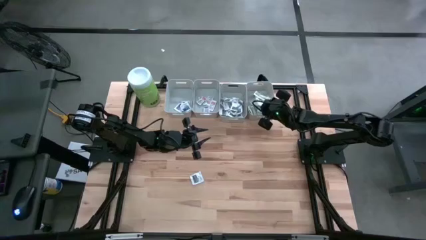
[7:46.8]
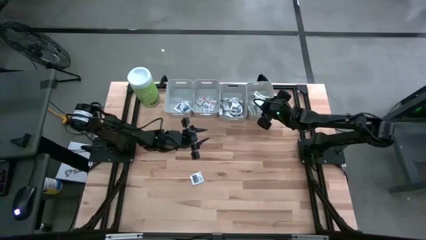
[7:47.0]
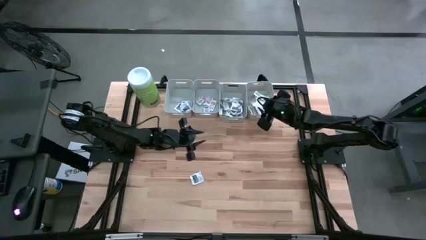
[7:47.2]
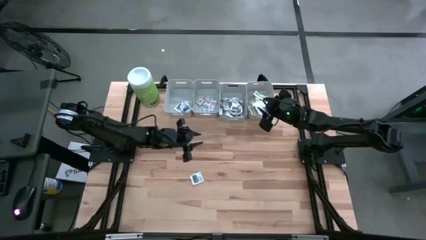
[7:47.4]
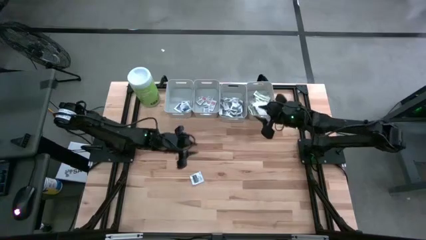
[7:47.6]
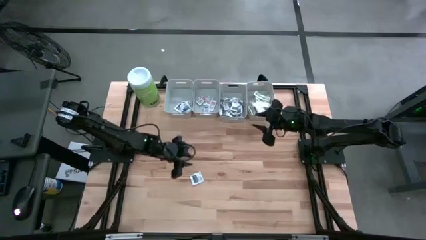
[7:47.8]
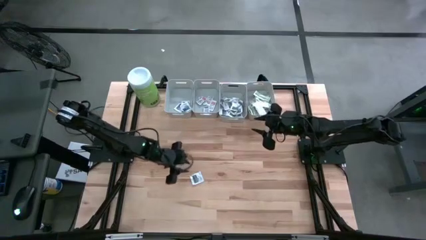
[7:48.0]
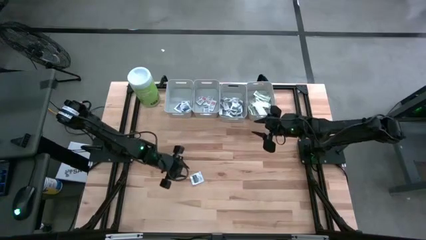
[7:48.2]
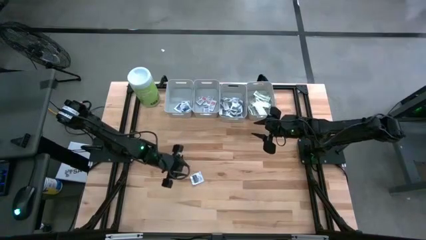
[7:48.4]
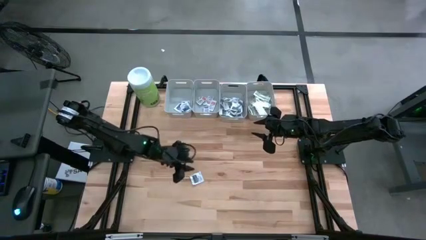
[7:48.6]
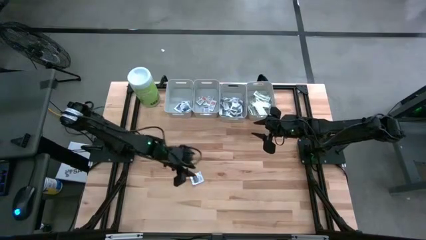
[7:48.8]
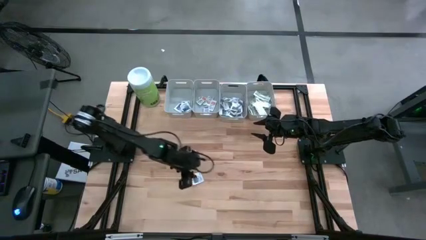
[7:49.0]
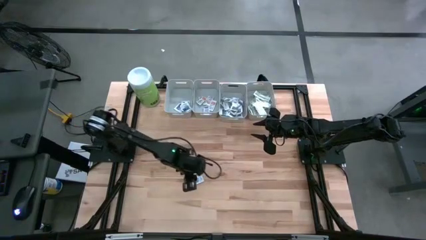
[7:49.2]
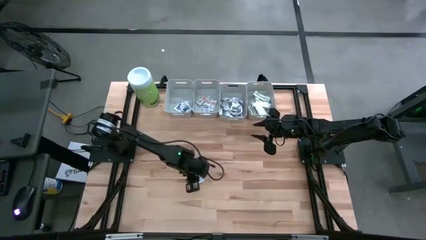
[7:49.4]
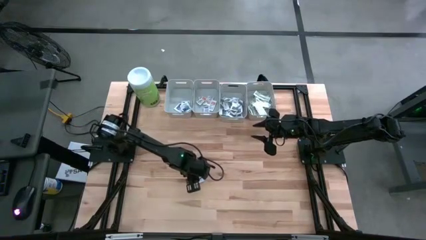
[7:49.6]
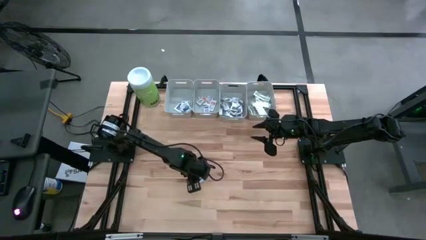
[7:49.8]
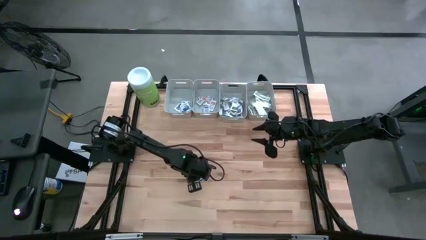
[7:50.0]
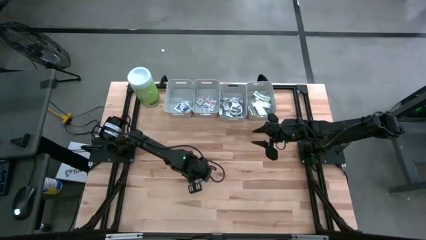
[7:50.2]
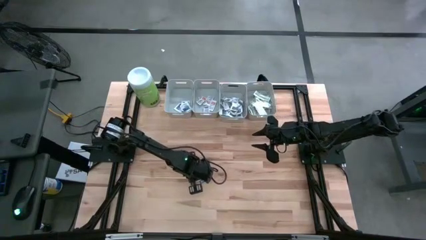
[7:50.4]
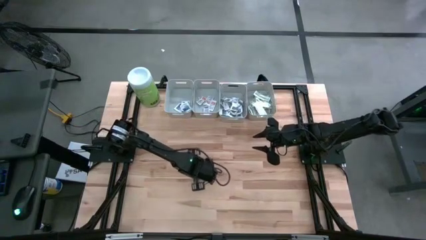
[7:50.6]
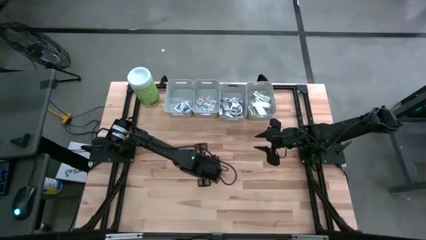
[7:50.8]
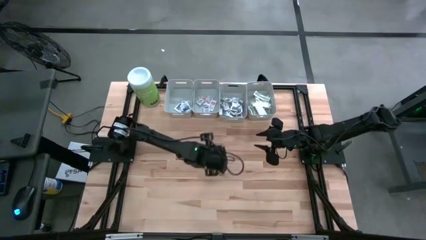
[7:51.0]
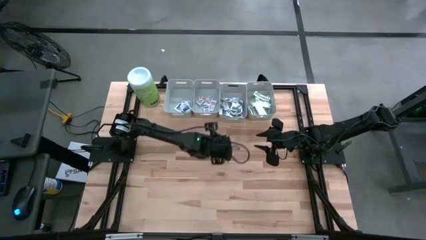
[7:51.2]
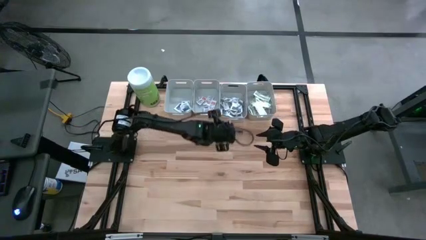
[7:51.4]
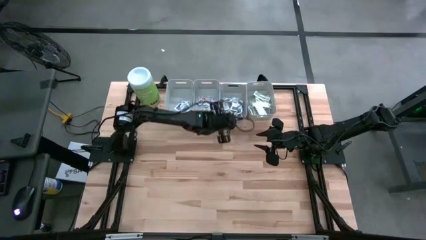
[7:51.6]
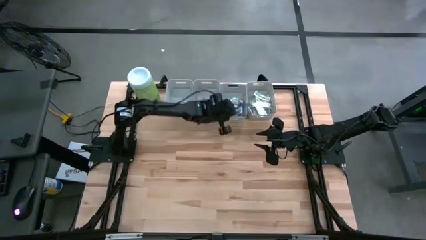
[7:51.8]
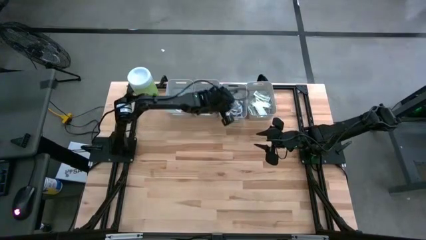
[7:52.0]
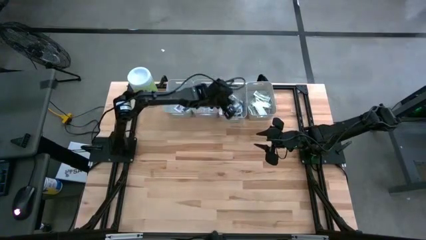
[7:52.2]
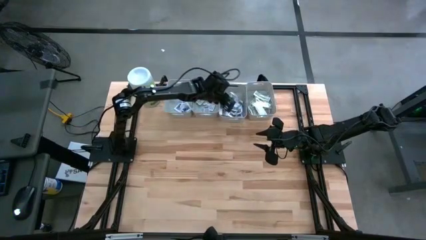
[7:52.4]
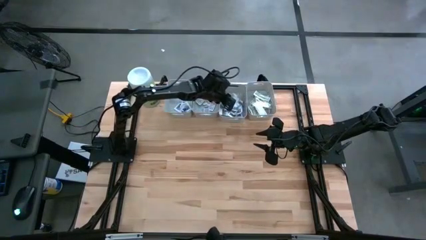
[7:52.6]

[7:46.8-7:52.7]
Task: Pick & Place First Aid Supplies
Put the towelette pack into the middle right gray bin

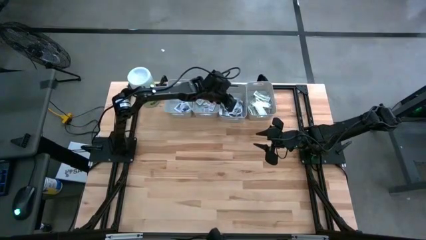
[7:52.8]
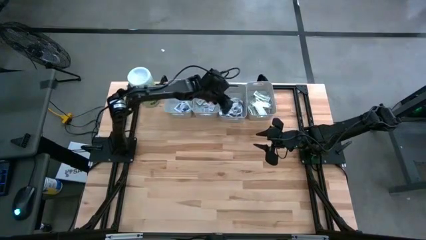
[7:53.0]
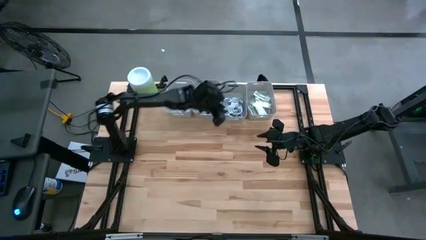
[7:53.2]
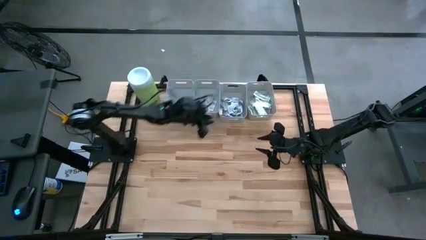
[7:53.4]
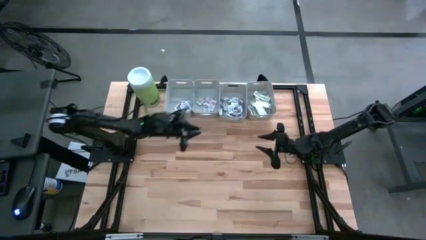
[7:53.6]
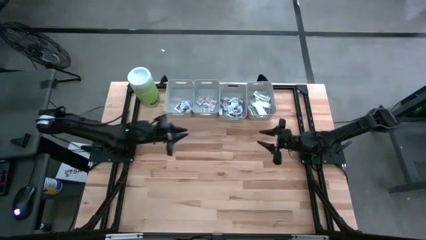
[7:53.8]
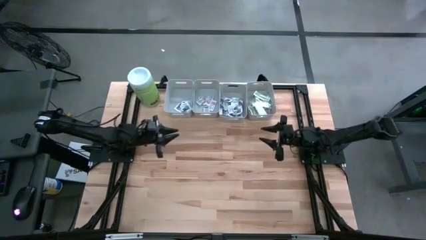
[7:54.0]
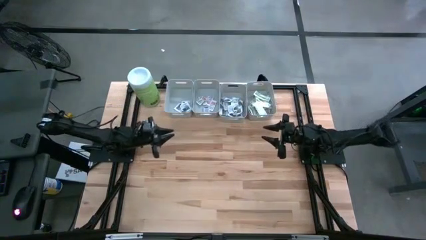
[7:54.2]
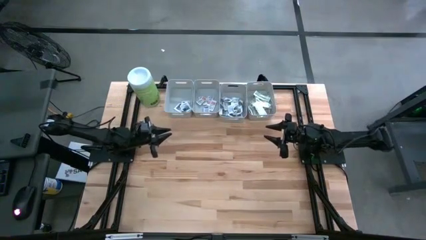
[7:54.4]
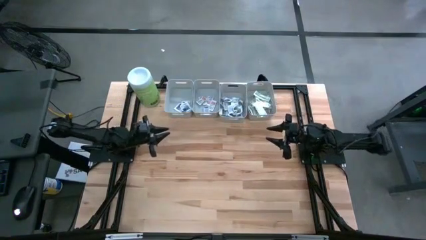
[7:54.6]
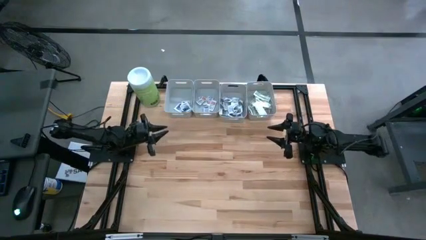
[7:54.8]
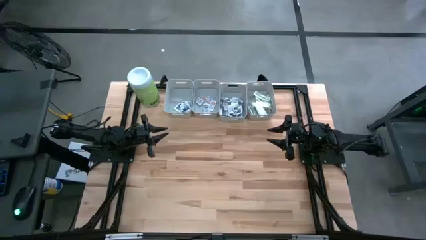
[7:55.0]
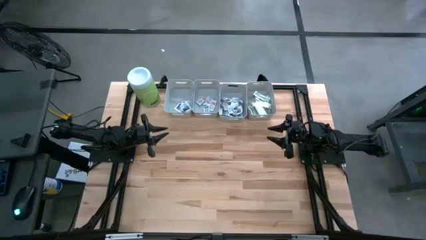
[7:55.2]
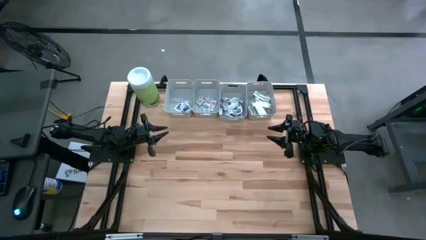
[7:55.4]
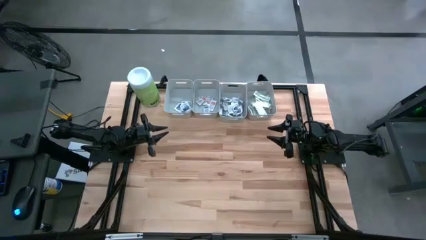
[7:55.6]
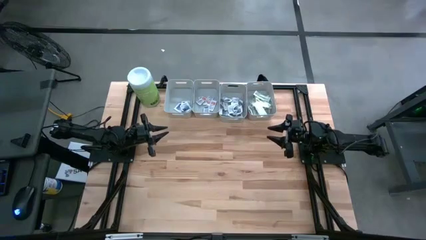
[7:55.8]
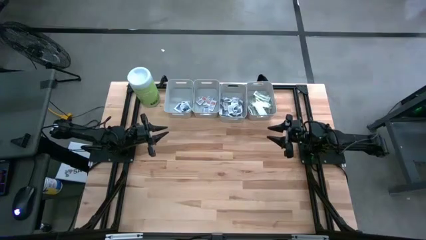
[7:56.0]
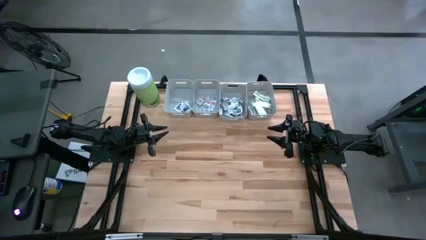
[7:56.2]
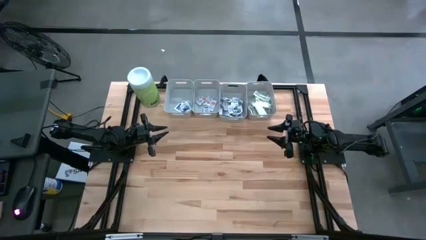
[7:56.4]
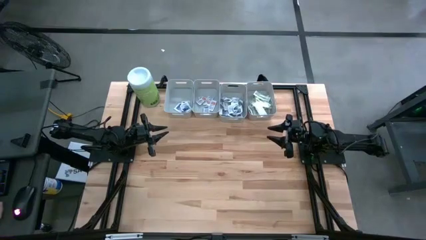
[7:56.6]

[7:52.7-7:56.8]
Return to Home Position

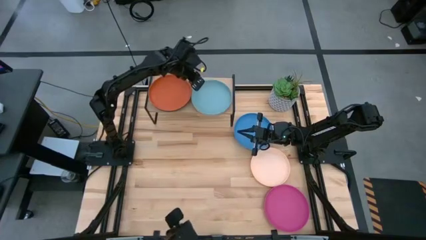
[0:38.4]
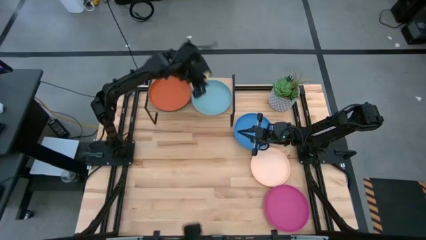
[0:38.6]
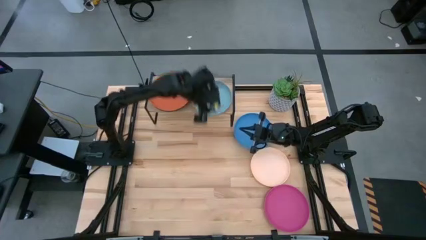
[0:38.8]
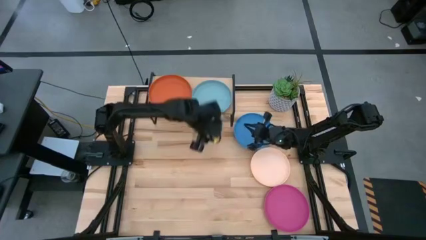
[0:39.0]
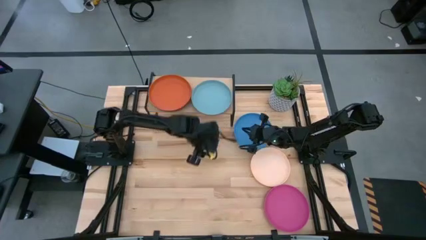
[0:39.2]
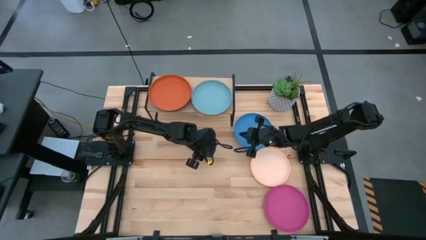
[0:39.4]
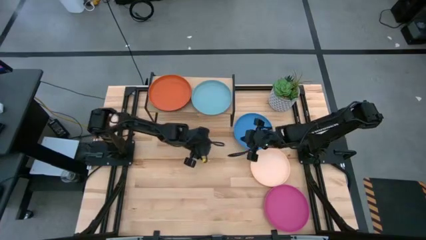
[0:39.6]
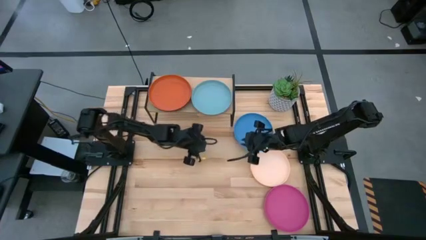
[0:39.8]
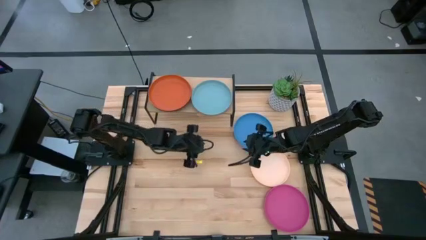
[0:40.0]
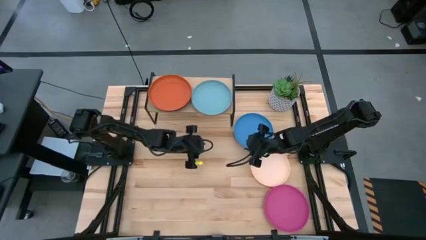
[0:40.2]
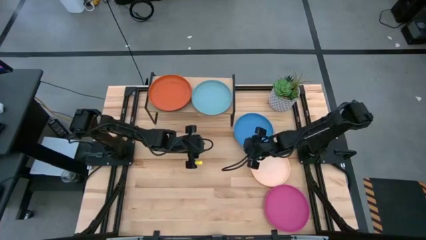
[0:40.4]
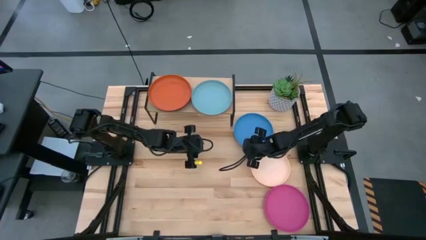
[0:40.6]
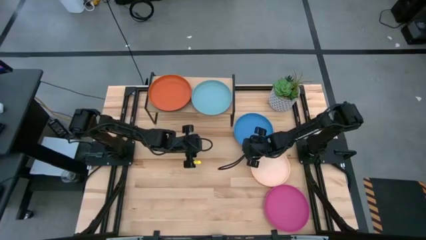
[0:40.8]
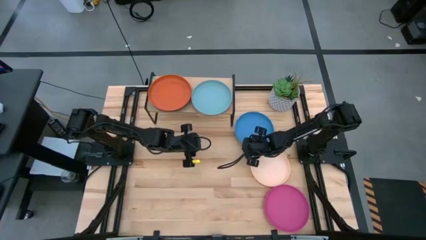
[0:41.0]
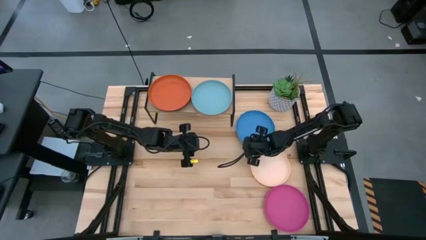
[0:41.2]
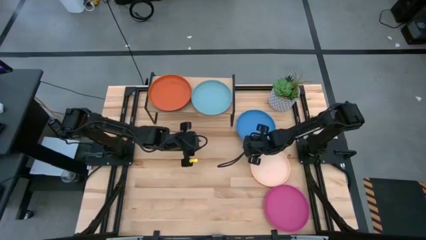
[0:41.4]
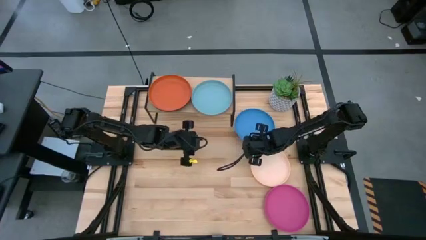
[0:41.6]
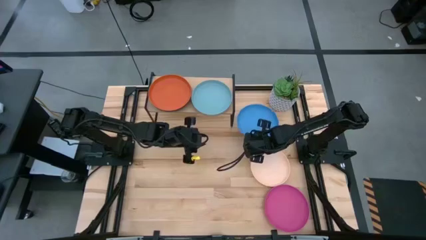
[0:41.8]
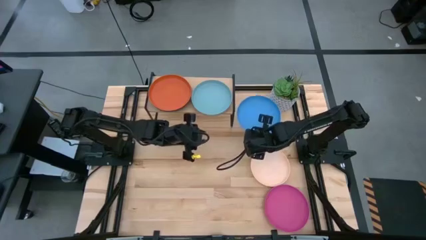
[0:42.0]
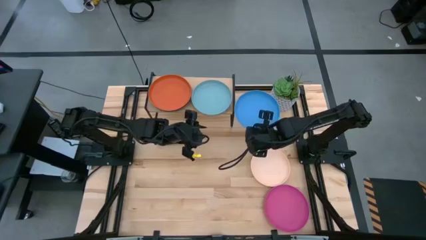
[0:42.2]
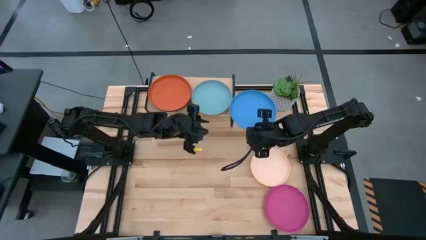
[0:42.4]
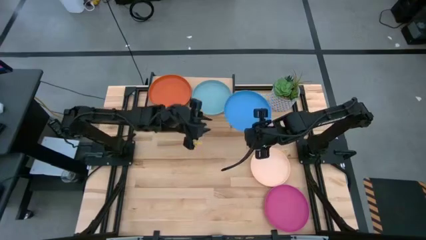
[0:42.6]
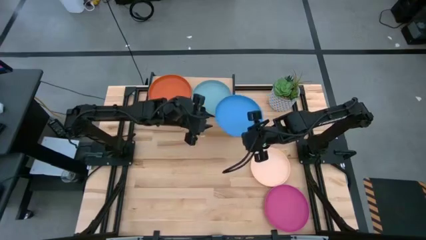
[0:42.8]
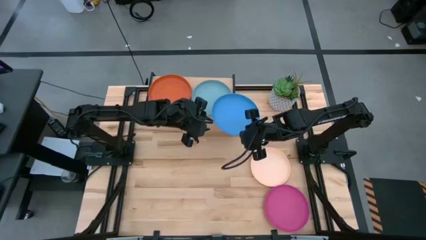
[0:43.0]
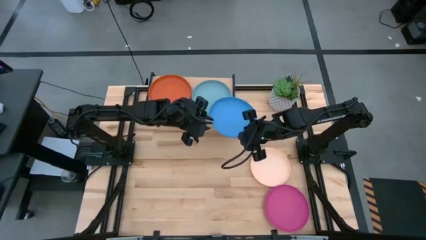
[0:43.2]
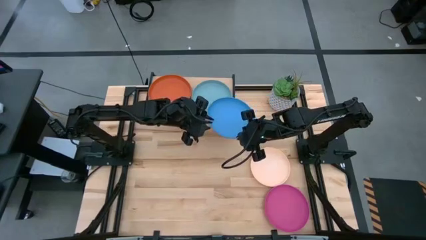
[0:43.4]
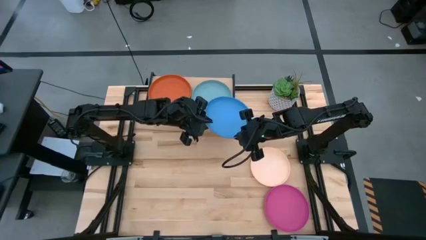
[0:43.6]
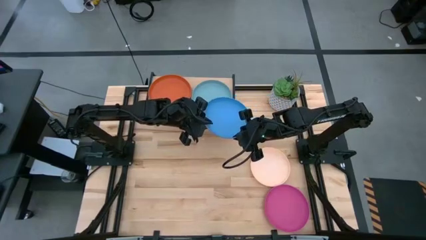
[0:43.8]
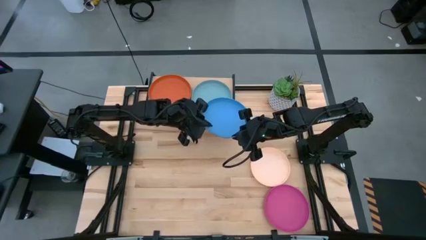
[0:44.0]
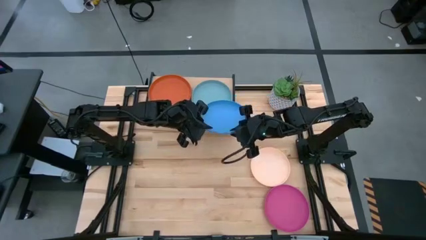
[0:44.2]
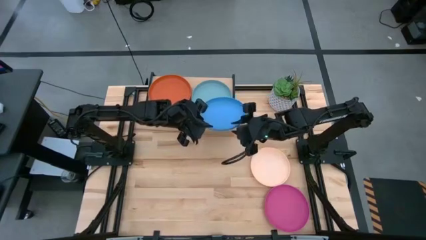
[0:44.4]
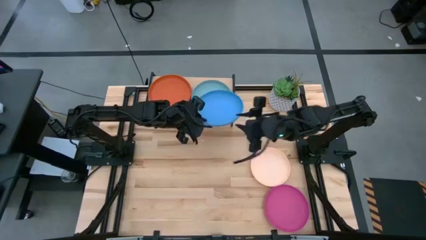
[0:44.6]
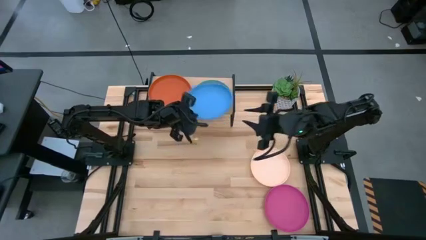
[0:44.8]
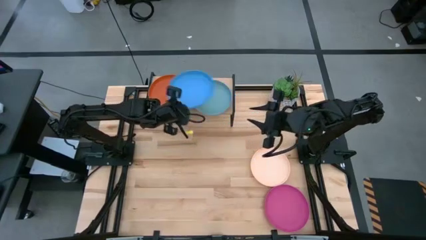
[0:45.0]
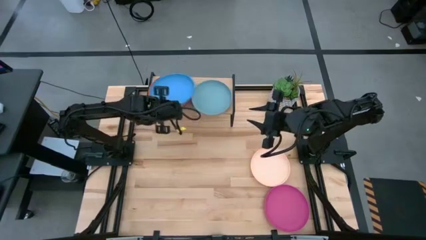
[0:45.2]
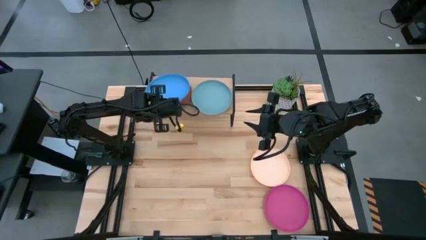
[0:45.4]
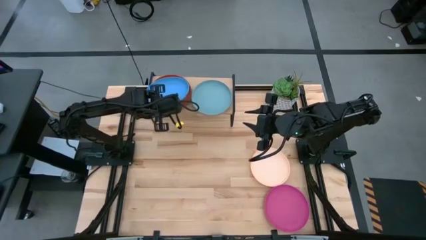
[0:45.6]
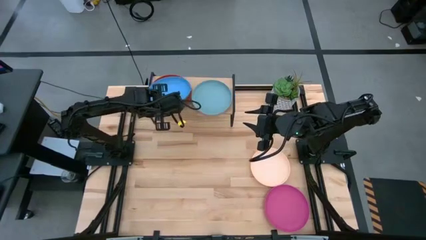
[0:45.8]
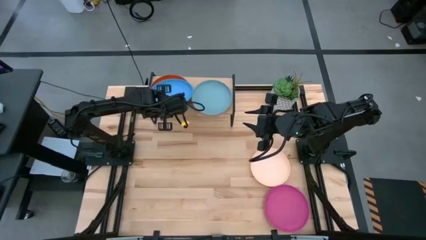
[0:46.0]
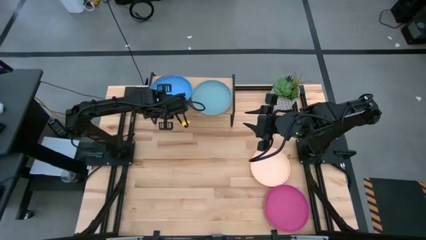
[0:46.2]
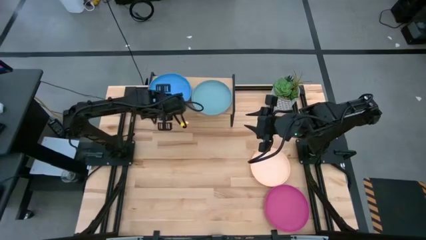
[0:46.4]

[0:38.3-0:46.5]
Task: Place and stack plates onto a shelf
Stack the blue plate on top of the orange plate on the shelf
